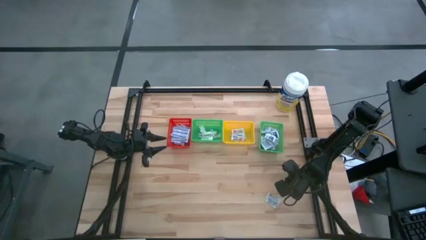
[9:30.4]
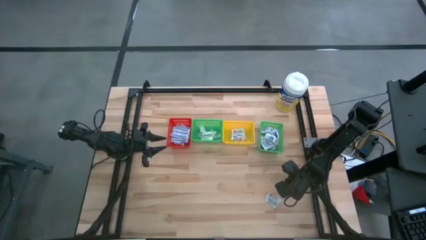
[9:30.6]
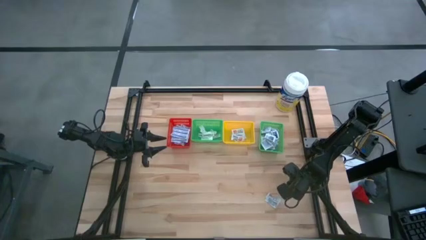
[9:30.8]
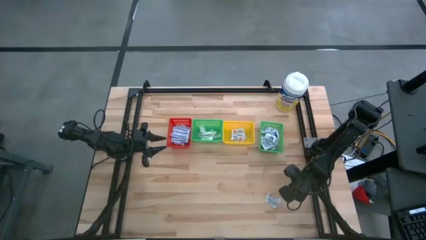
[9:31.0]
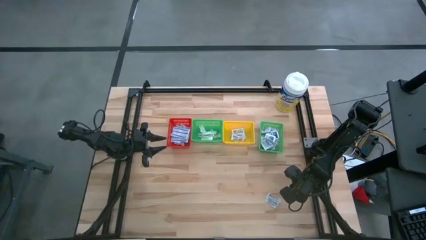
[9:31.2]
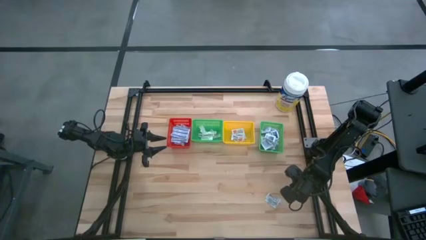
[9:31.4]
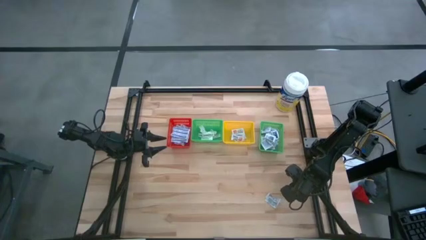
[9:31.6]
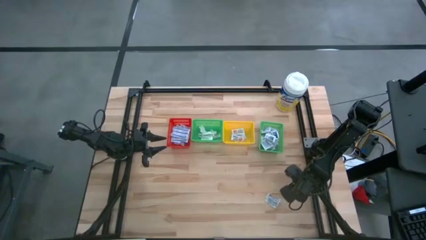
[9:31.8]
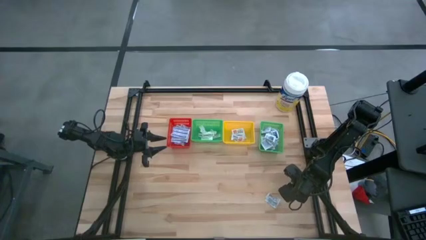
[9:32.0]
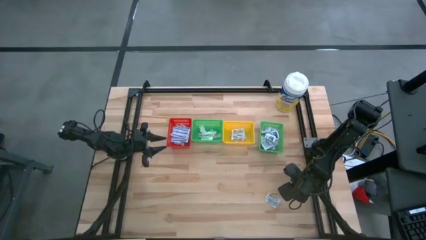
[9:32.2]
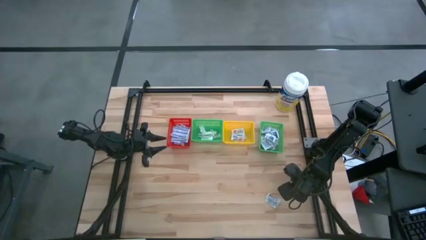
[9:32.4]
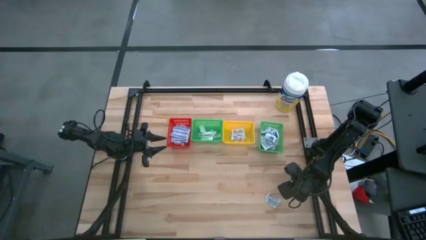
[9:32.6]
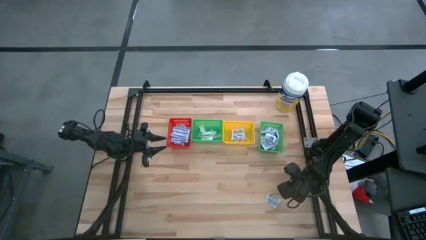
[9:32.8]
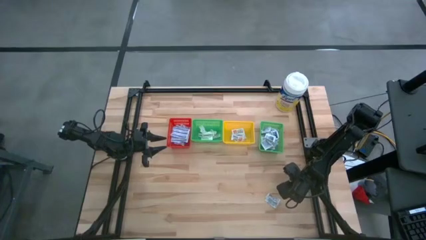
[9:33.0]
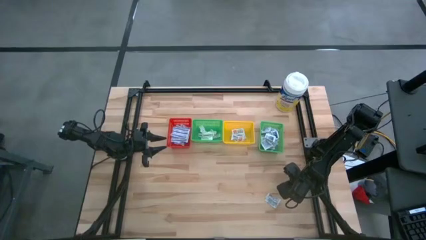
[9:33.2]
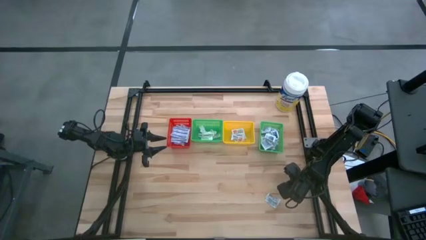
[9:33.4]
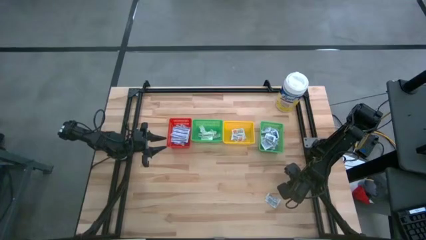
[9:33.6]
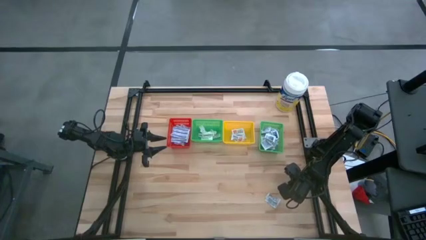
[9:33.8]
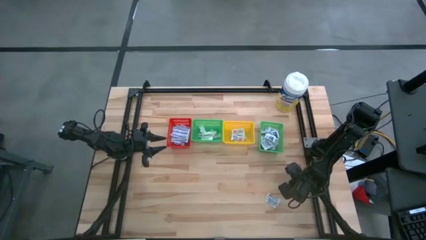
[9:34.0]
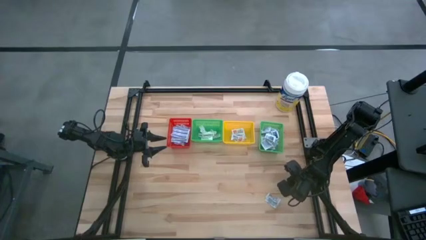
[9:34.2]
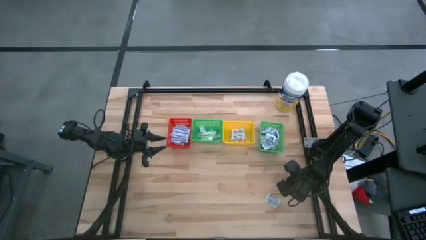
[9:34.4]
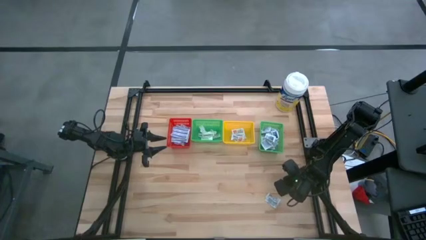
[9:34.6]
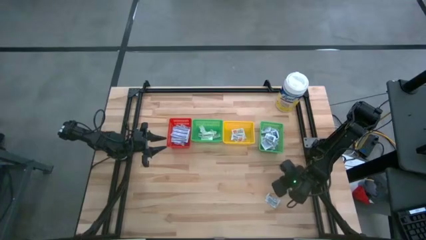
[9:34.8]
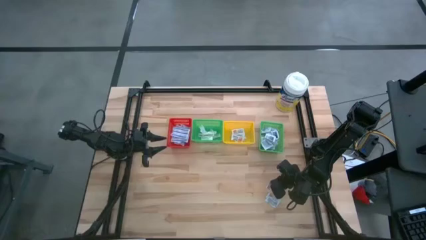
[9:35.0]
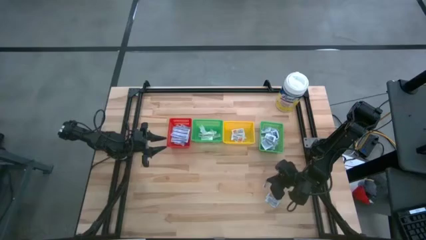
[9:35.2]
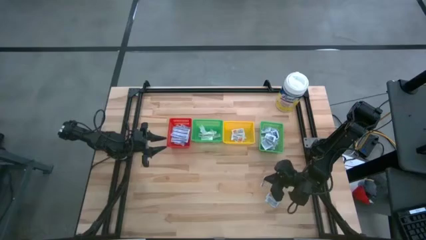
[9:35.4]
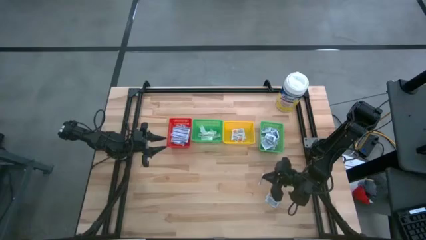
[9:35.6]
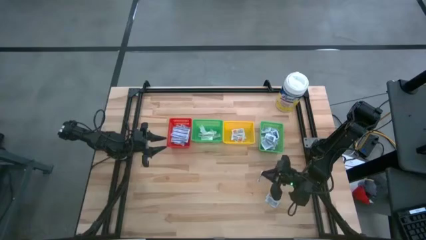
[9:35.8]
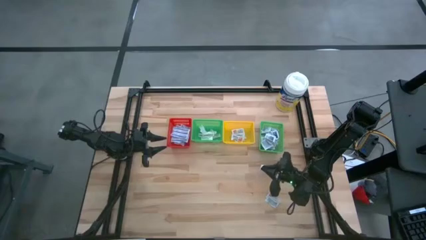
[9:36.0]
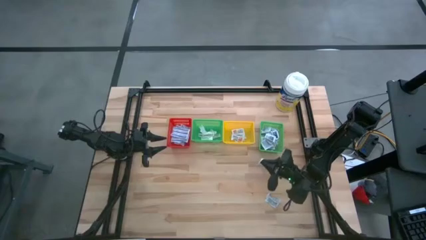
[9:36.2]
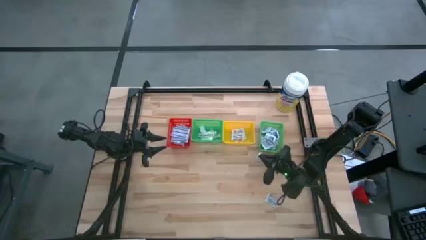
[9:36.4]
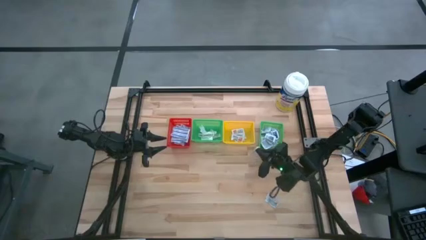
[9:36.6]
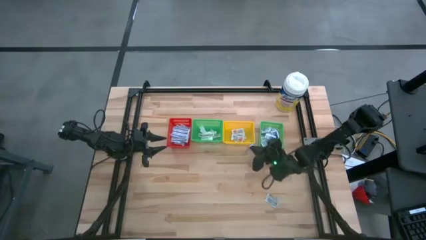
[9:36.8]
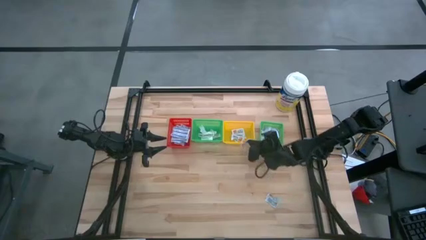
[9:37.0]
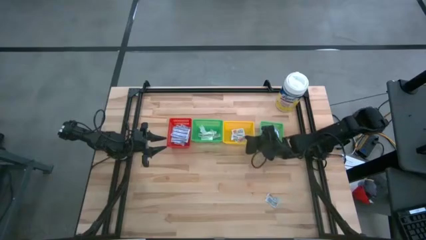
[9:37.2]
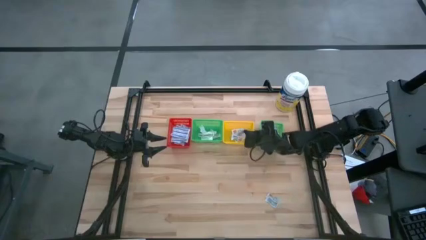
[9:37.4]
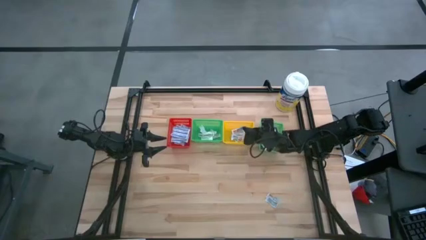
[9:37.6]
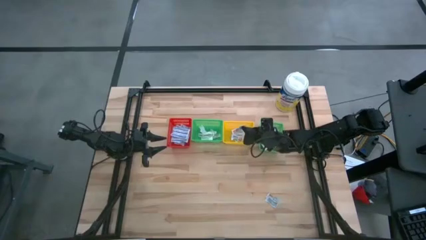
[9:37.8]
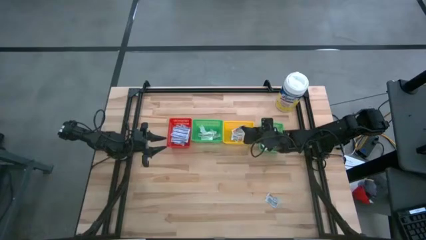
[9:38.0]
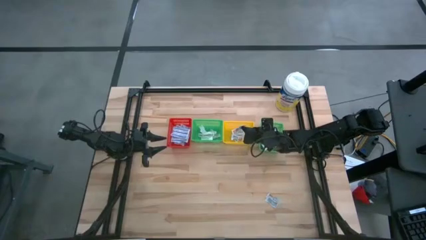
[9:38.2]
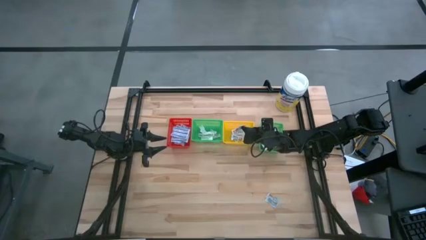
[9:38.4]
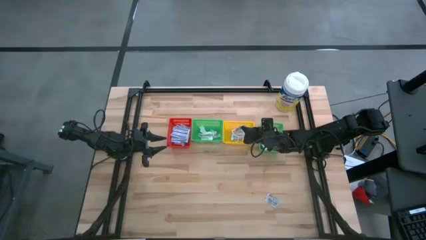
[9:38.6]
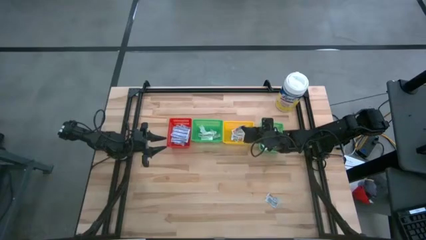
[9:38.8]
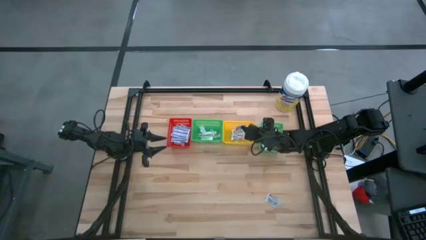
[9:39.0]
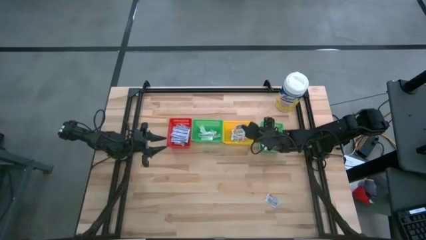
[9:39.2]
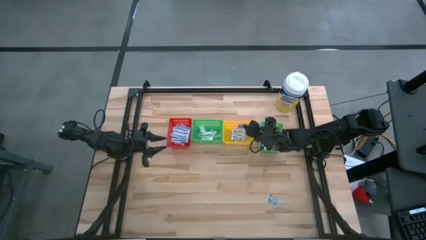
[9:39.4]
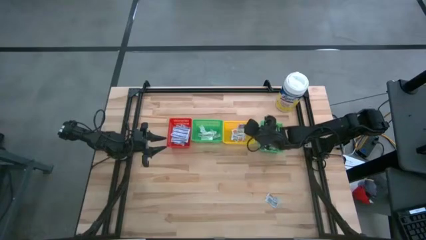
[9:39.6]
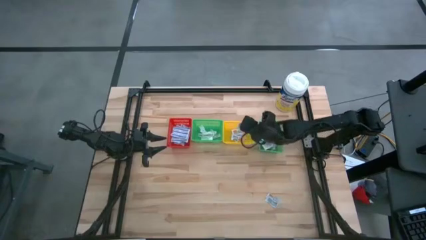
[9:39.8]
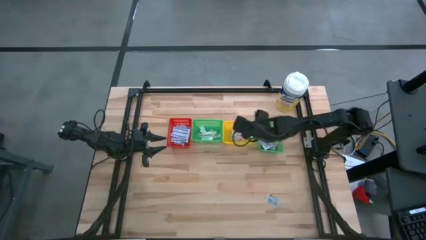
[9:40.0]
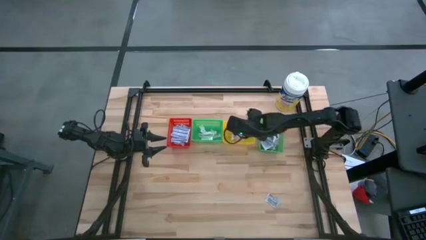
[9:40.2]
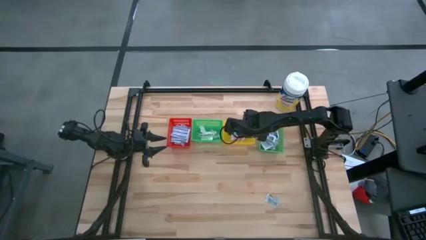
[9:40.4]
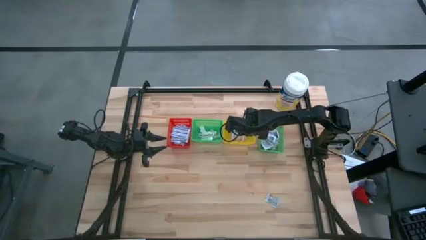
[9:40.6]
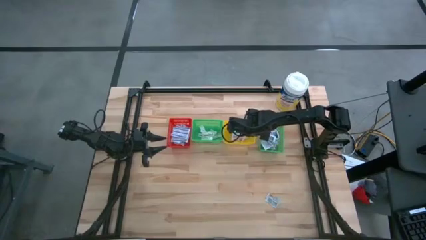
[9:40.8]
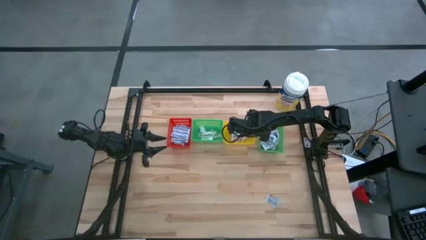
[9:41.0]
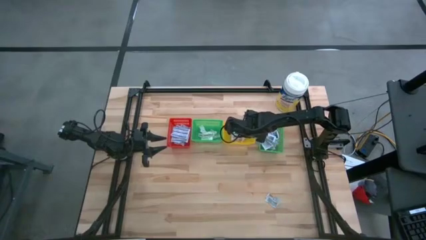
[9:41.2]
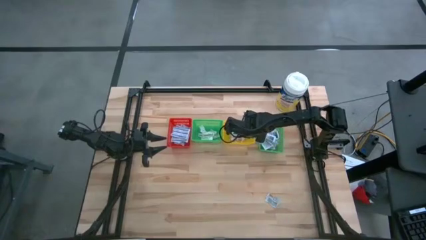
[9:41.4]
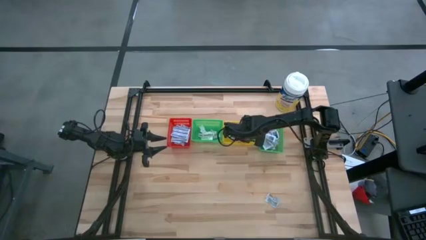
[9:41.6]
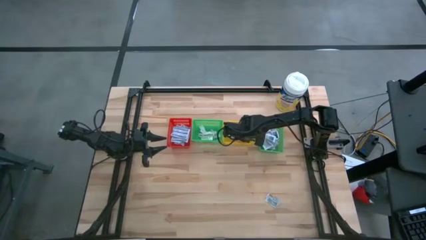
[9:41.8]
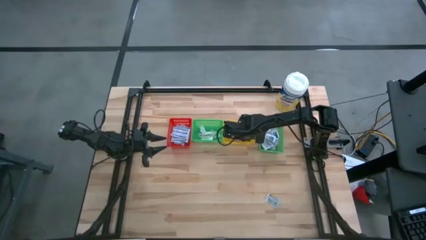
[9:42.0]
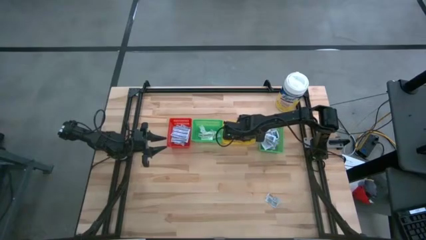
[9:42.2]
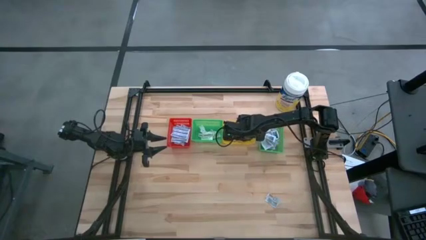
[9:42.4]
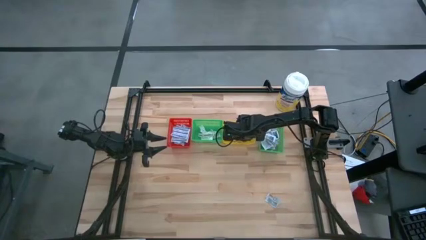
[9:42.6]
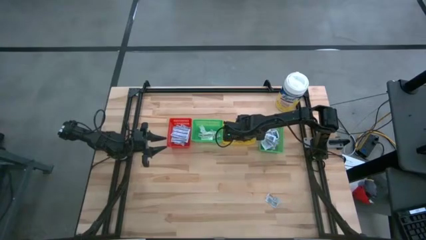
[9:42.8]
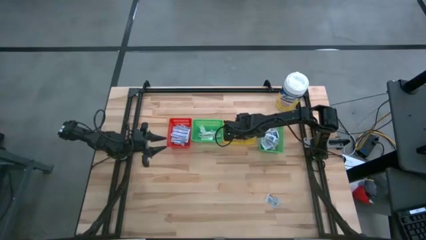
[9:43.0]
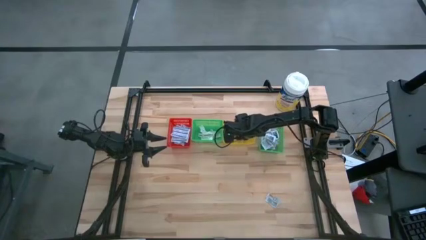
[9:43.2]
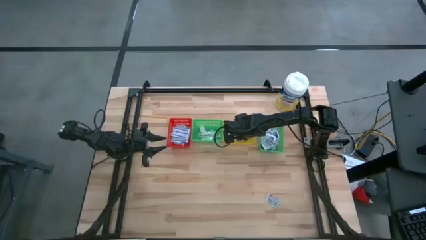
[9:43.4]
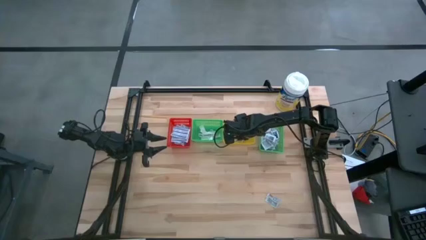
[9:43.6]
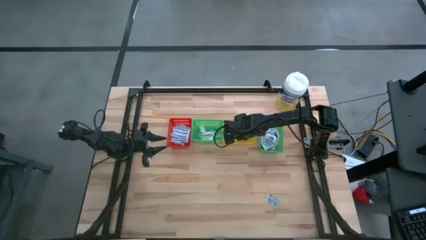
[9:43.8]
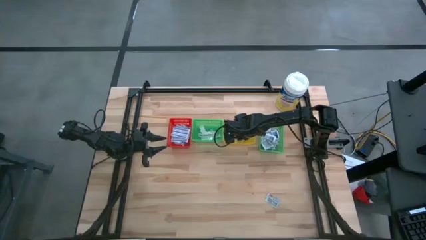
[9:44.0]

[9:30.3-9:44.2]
Task: Pick & Place First Aid Supplies
Put the orange ointment pack into the yellow bin

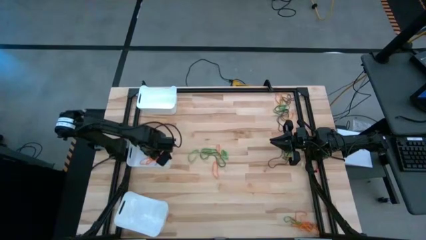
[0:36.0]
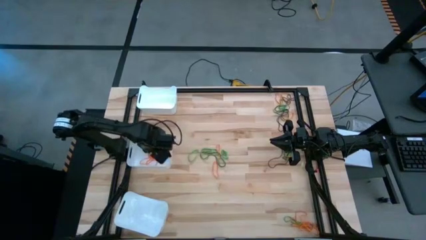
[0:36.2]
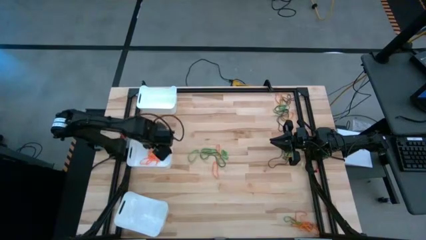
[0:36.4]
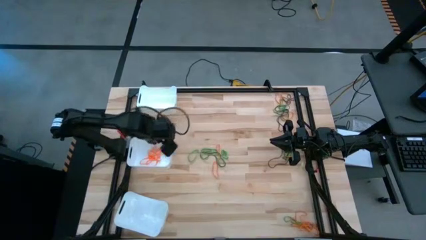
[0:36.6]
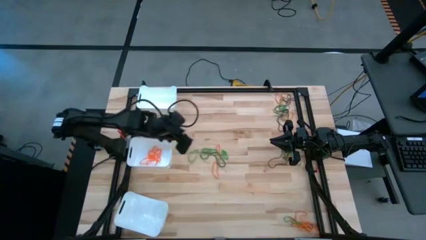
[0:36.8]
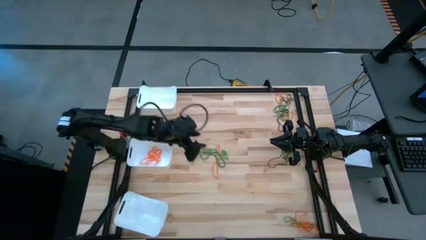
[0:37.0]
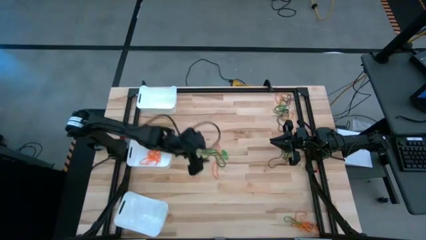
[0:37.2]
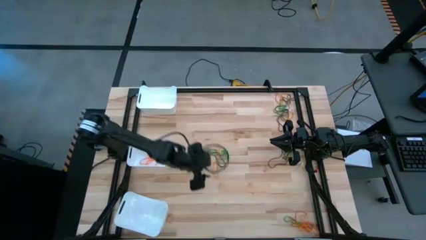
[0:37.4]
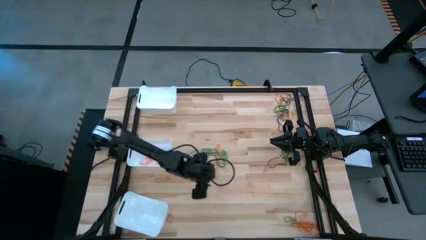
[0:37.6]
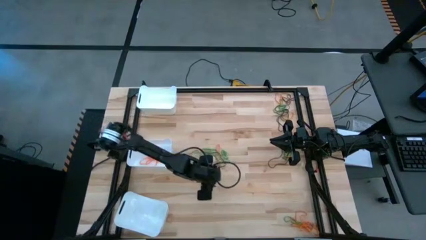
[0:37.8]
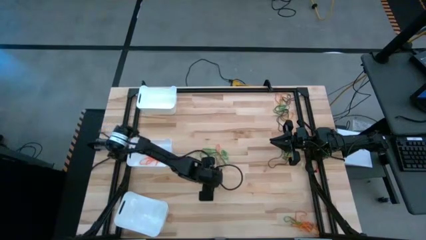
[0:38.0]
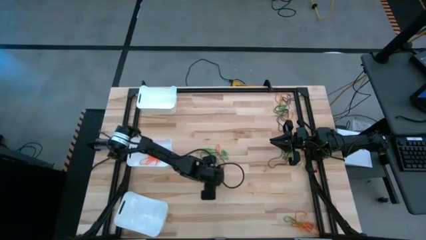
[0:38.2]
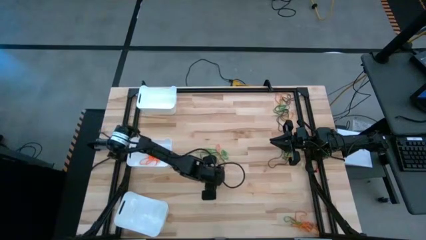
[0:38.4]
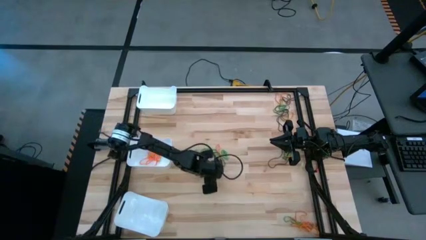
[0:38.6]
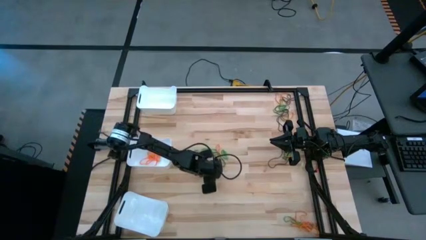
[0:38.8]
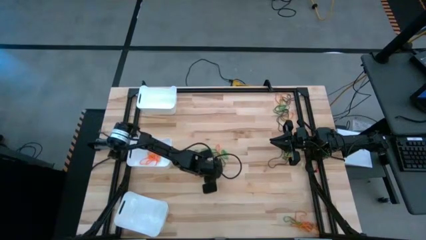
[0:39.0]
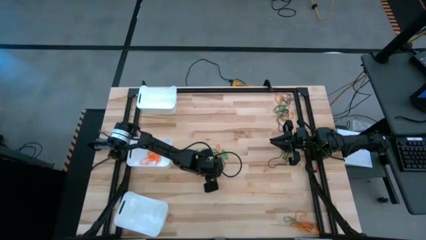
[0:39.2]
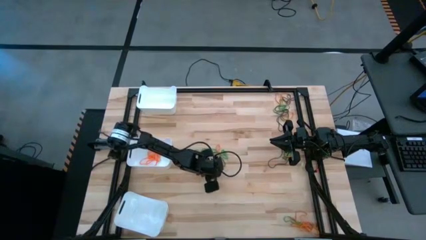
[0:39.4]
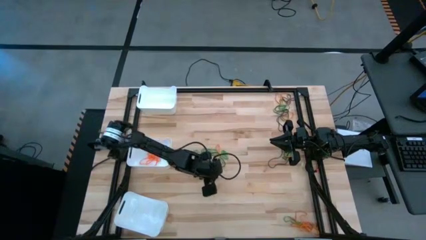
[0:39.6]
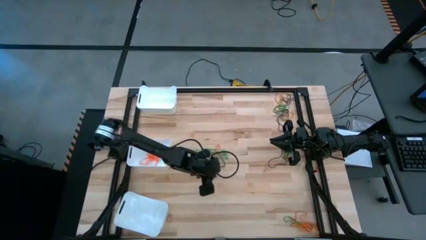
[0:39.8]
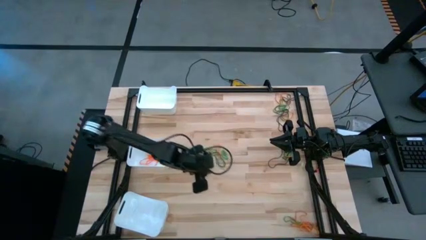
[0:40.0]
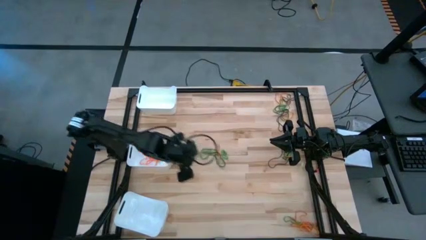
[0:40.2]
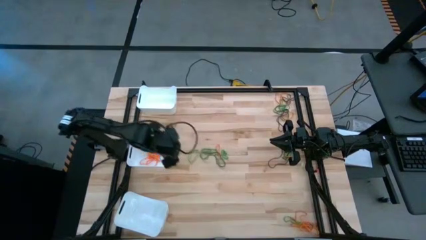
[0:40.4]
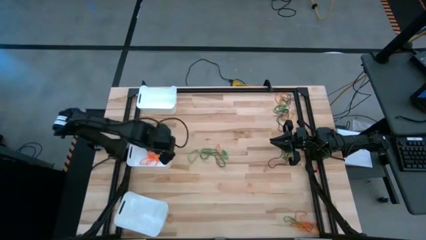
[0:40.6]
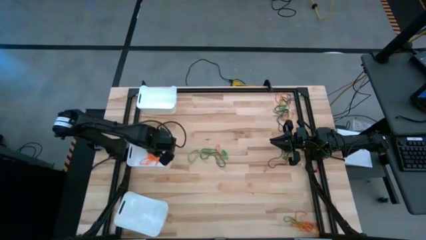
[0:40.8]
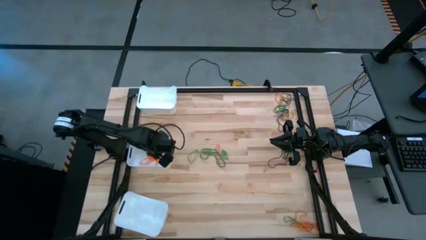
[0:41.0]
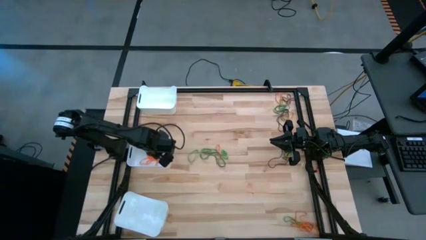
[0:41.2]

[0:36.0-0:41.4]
Task: Sort rubber bands into baskets
Put the orange rubber band into the middle white bin
